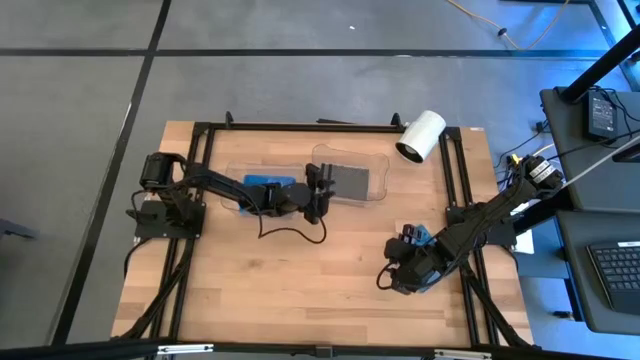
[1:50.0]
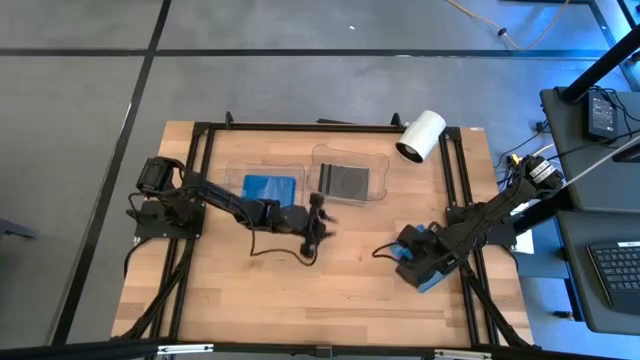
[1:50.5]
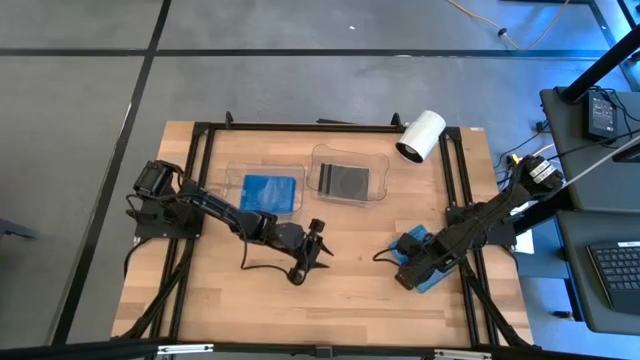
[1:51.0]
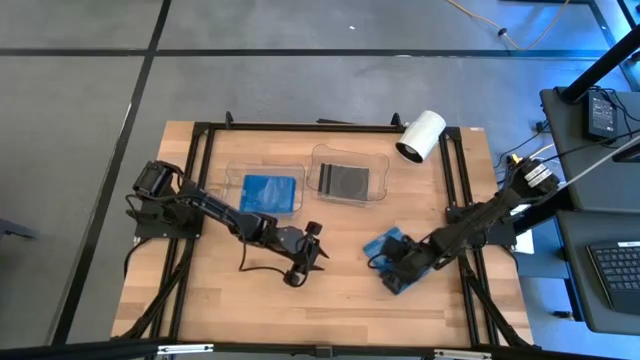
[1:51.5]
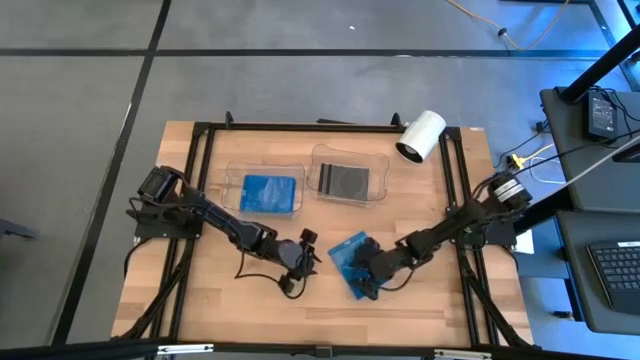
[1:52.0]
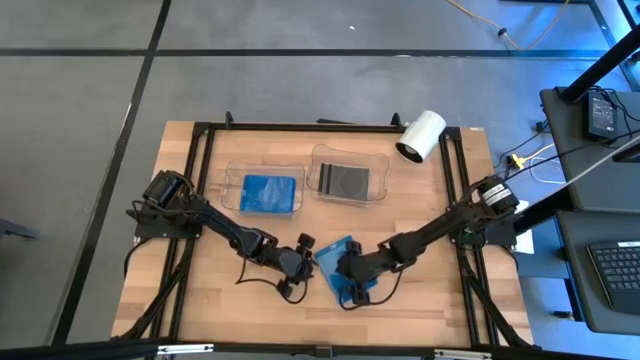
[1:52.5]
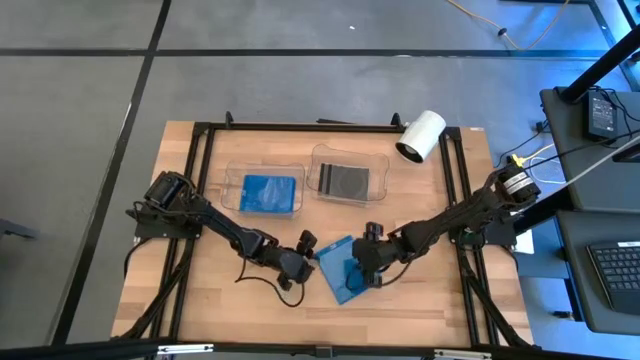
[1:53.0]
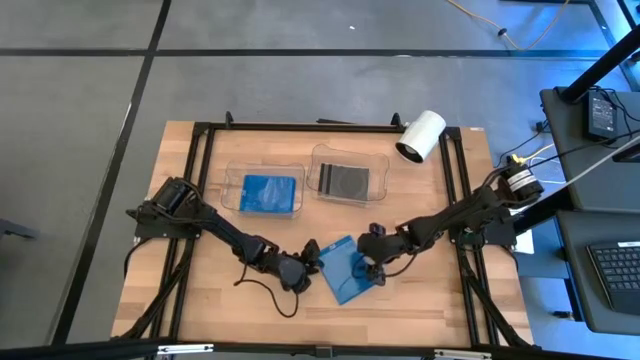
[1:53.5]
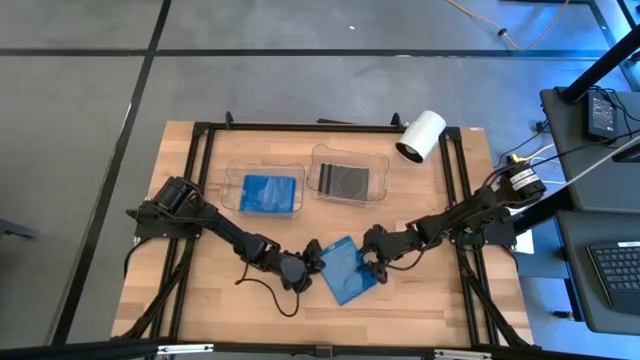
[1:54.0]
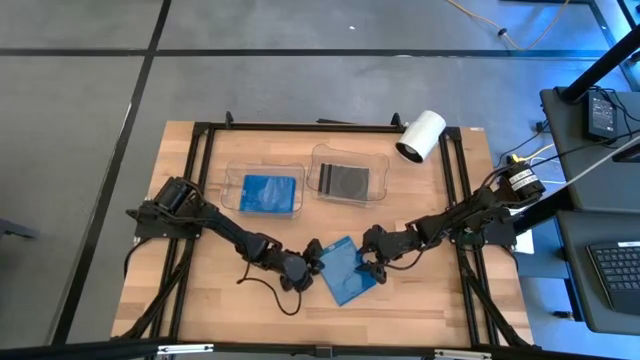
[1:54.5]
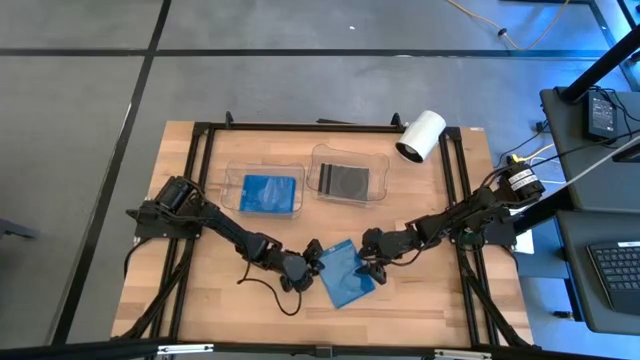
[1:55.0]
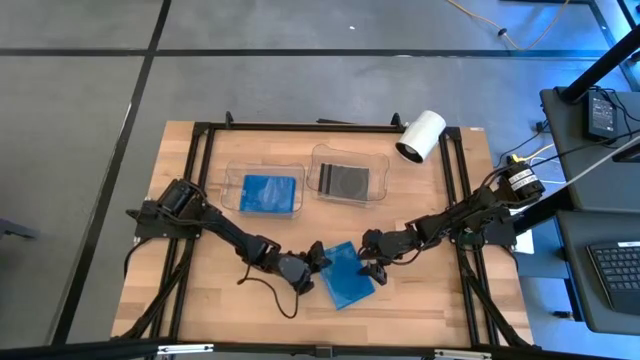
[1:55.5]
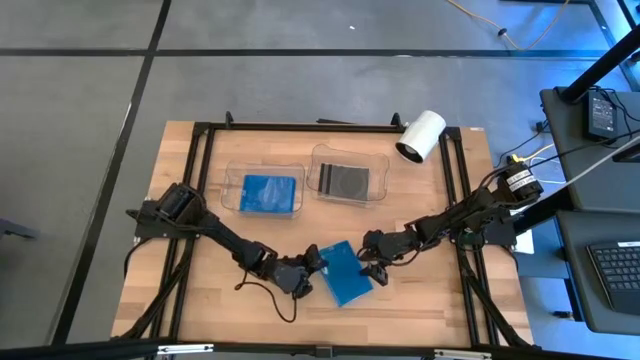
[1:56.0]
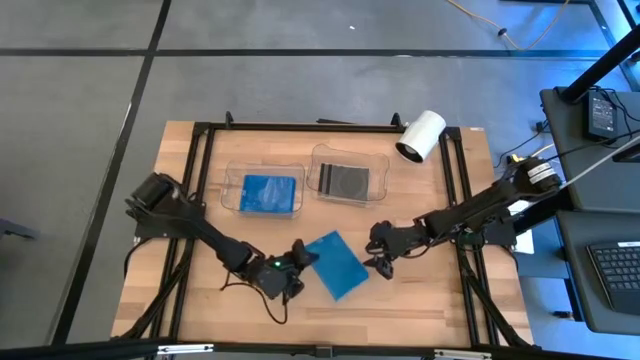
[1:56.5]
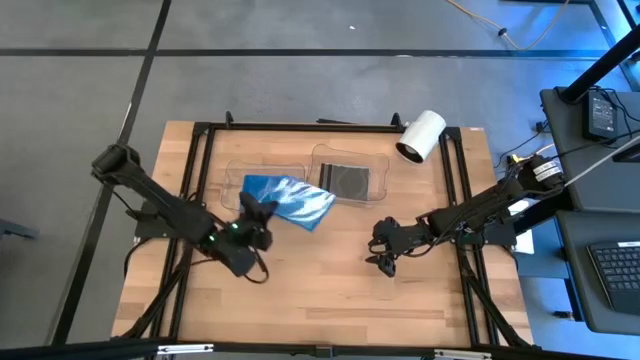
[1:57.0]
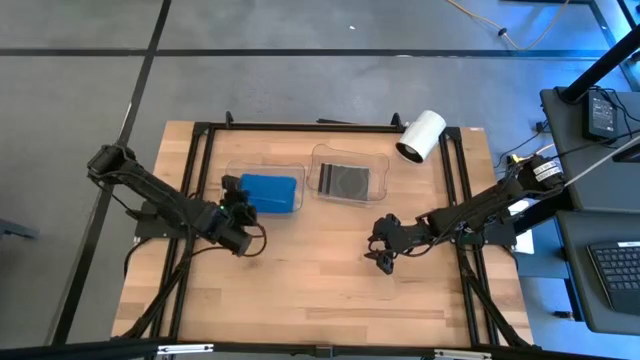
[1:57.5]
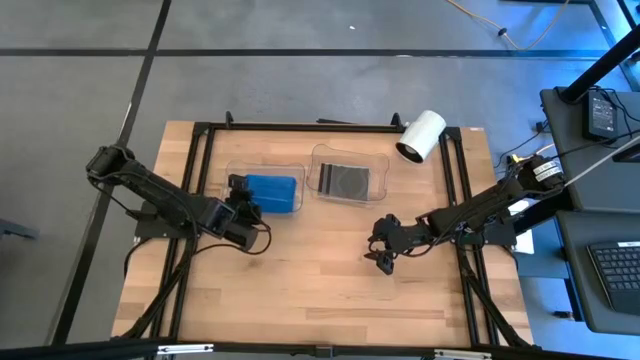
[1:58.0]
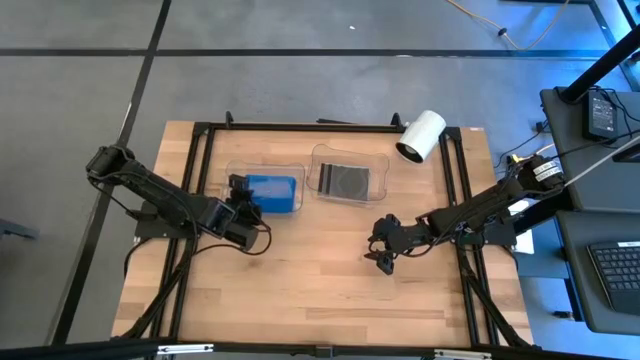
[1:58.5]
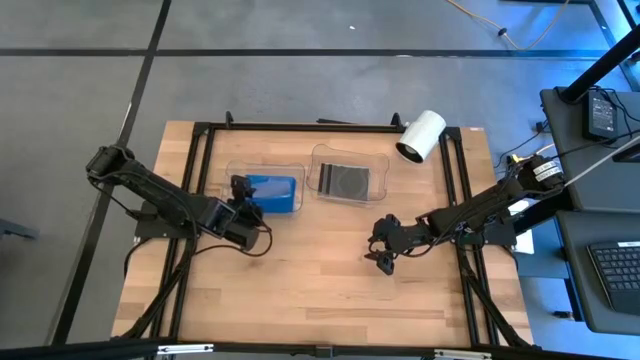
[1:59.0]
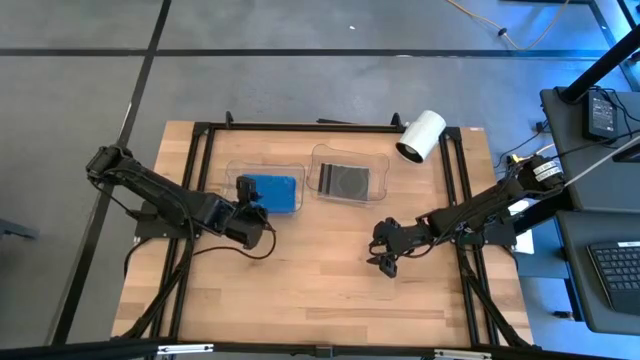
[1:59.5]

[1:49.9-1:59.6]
Task: Pick & place jewel cases by type
Put the blue CD case into the left transparent bin

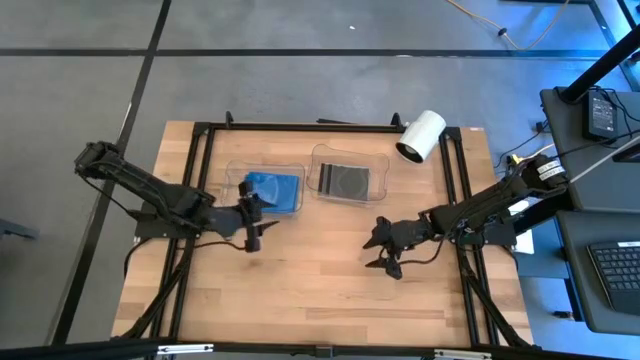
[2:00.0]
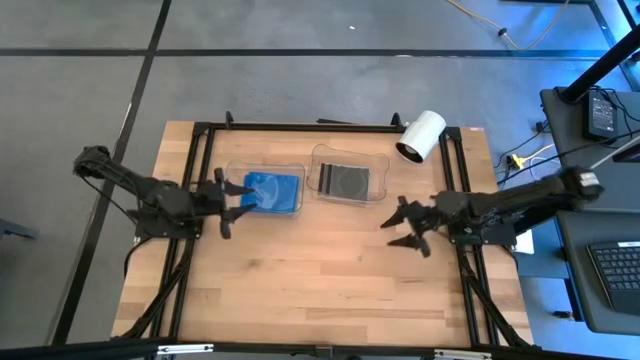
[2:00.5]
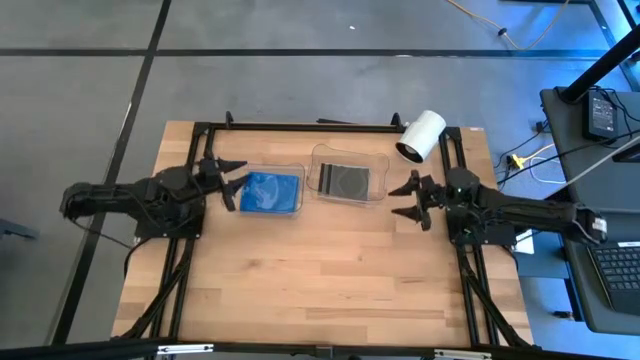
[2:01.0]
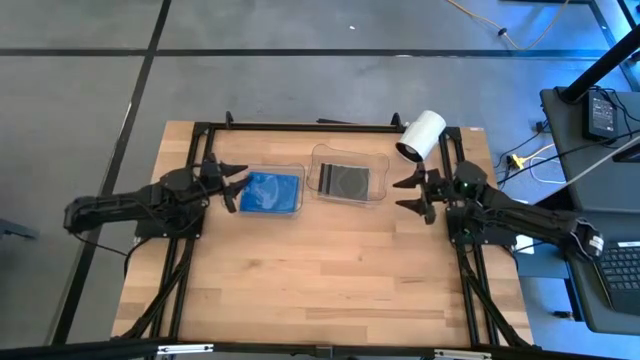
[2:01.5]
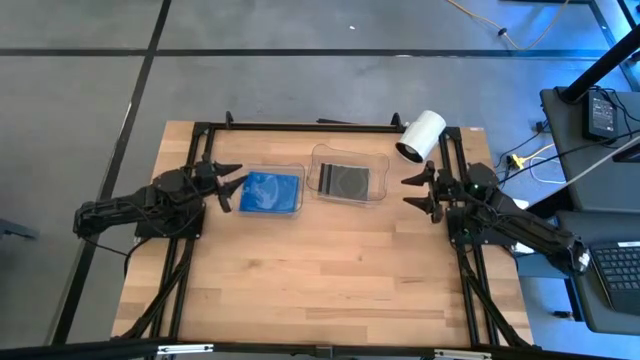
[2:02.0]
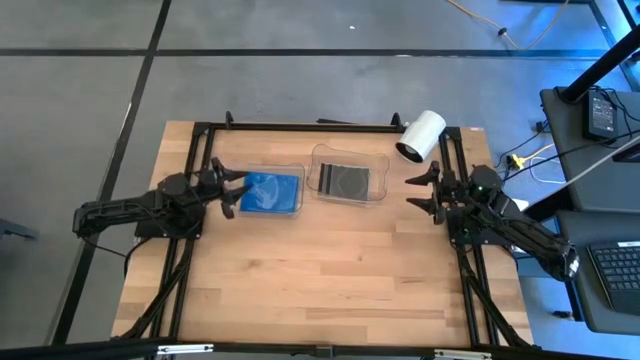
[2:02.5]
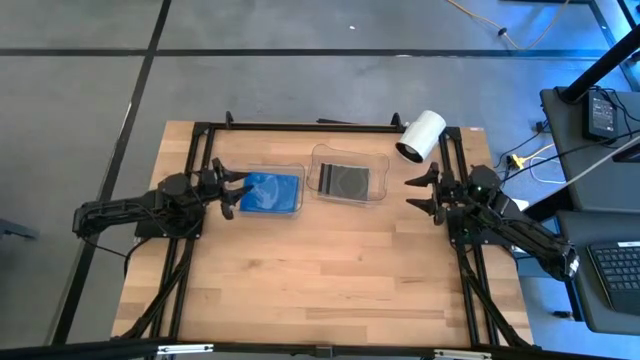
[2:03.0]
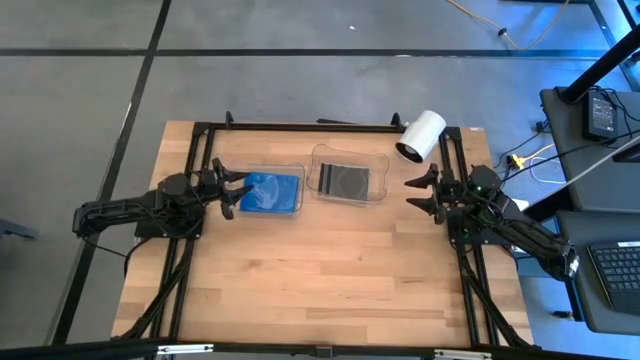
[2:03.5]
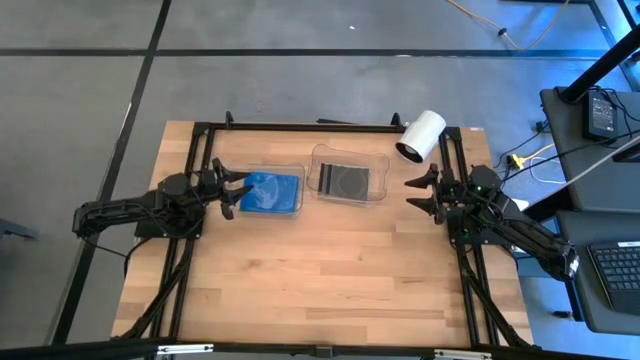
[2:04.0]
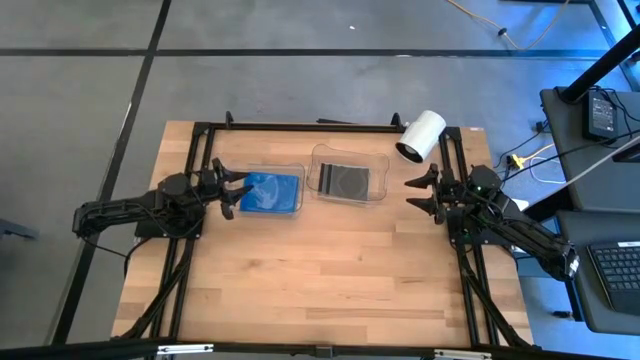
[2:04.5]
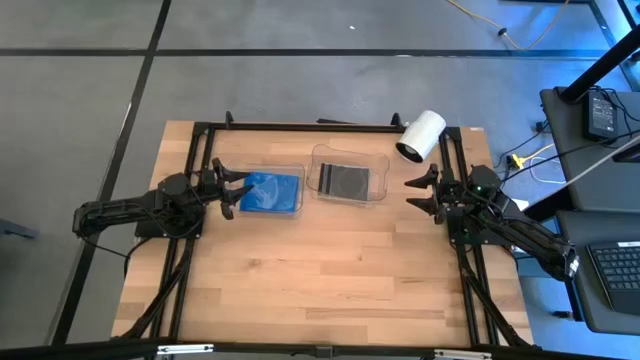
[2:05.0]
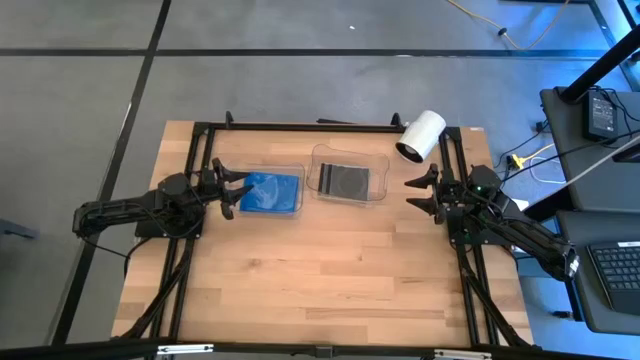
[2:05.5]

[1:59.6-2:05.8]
Return to Home Position

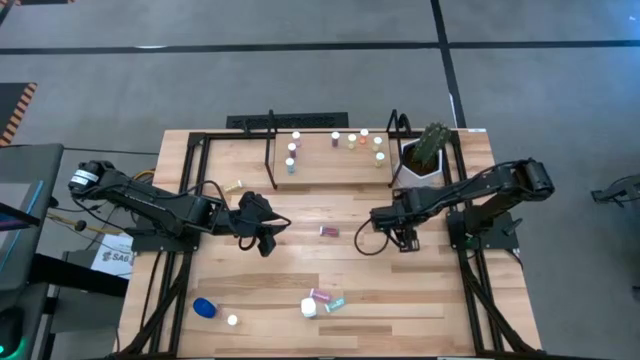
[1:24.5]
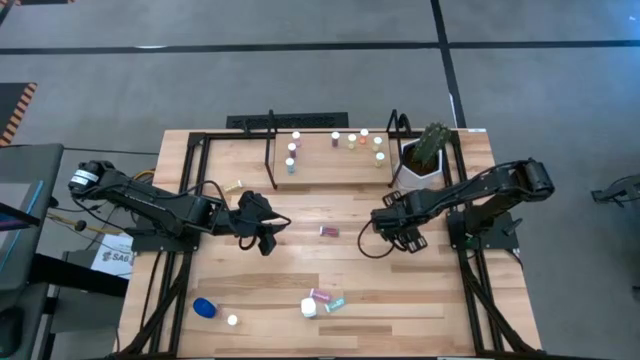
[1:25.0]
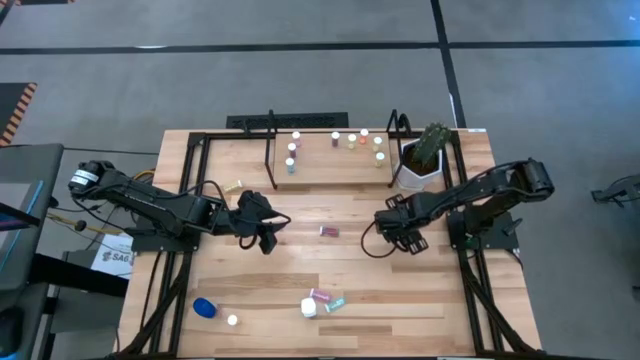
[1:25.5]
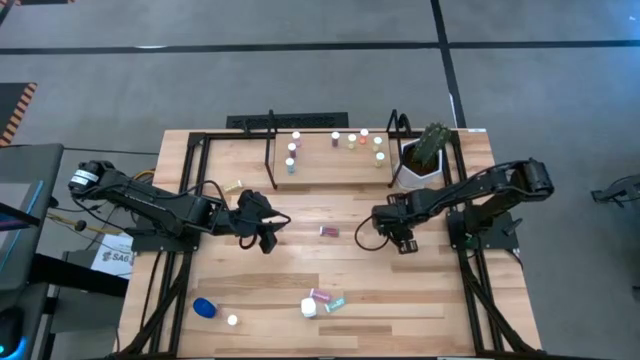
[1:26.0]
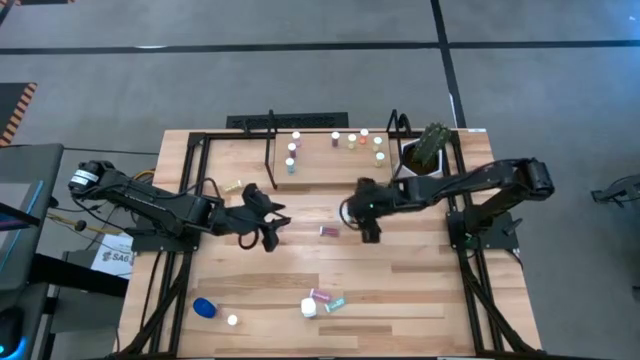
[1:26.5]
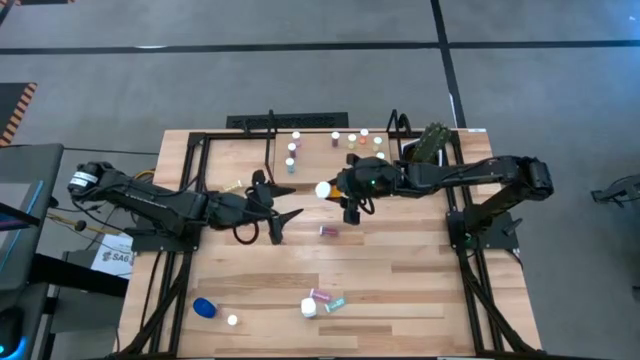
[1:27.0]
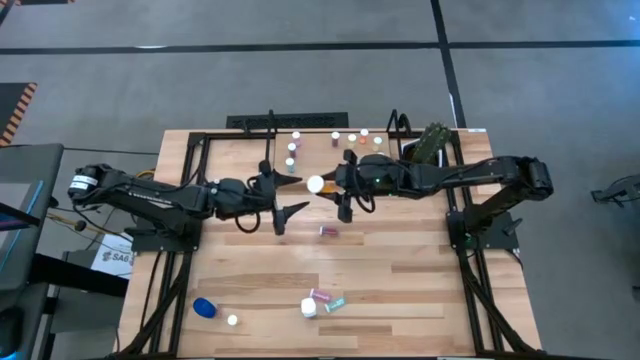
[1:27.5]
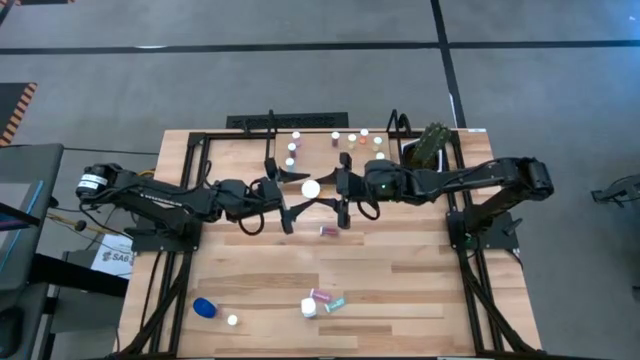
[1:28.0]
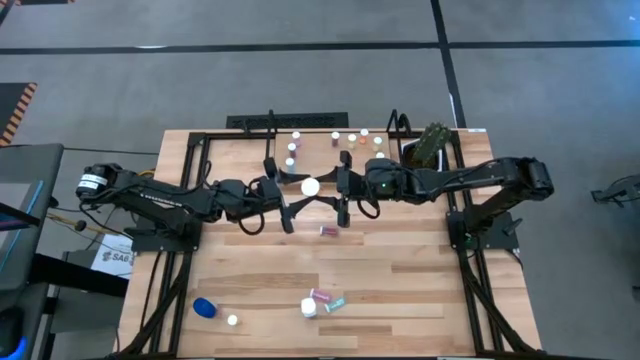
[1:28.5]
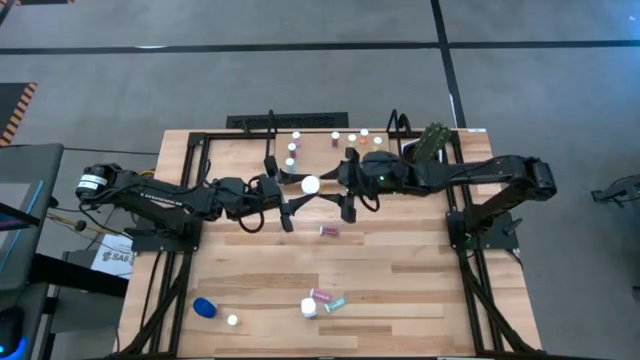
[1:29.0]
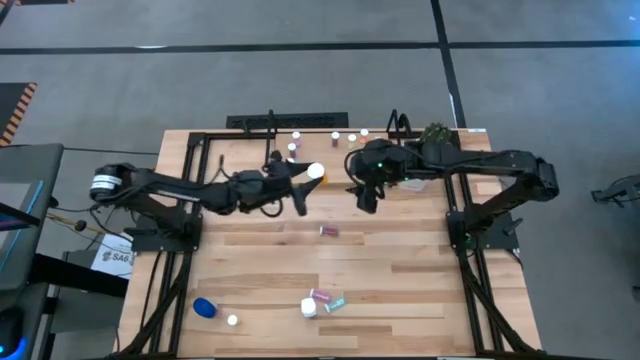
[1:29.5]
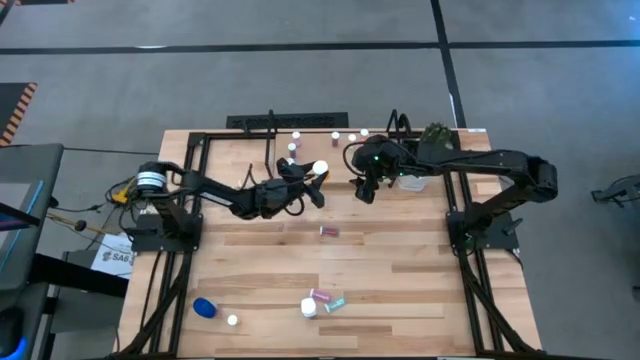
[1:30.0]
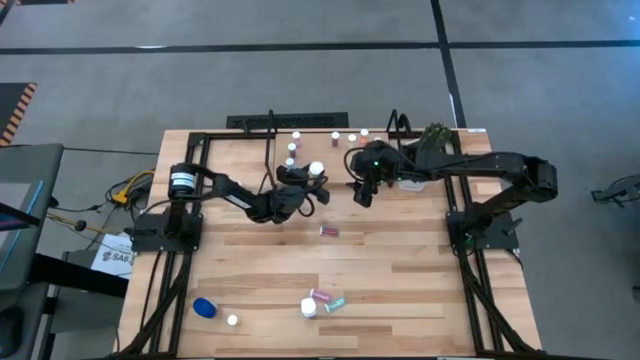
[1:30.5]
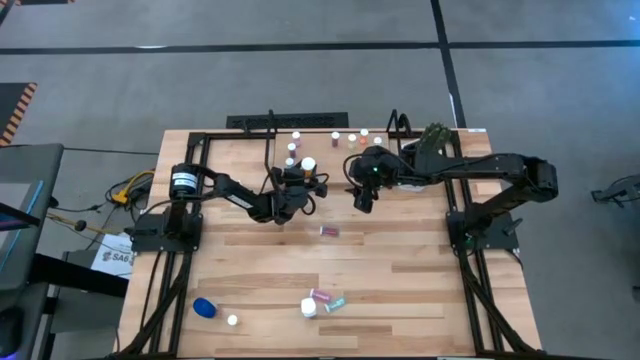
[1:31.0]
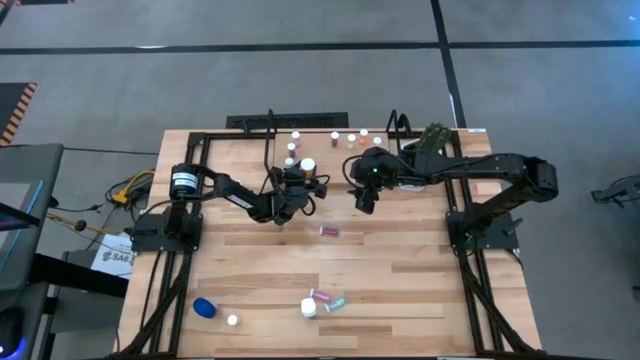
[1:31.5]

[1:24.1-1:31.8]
Task: Pick and place medicine bottles onto shelf by color
Put the orange pill bottle on the shelf
